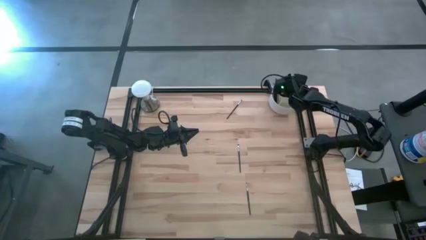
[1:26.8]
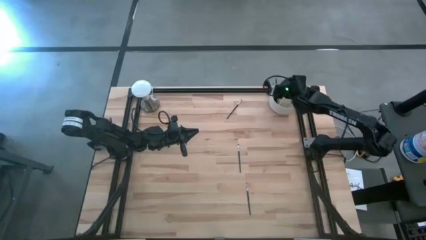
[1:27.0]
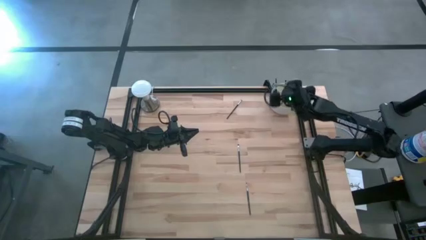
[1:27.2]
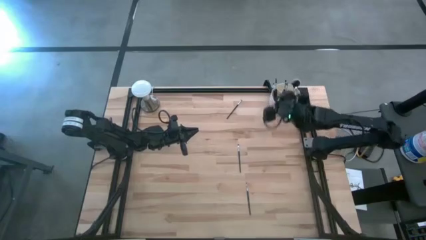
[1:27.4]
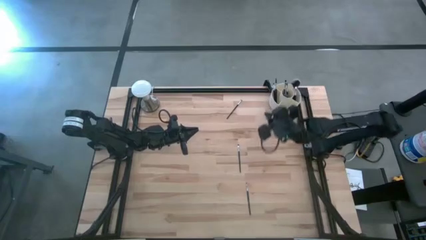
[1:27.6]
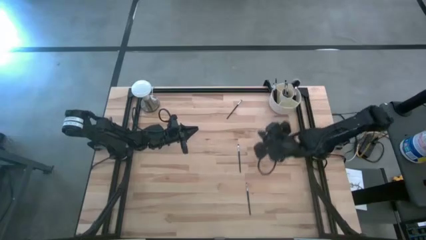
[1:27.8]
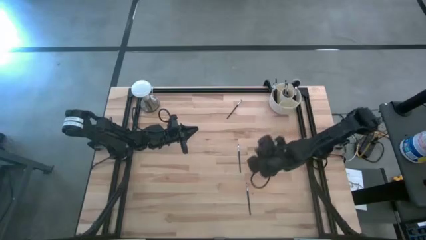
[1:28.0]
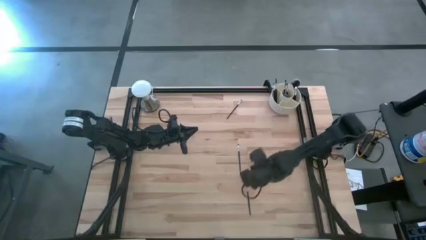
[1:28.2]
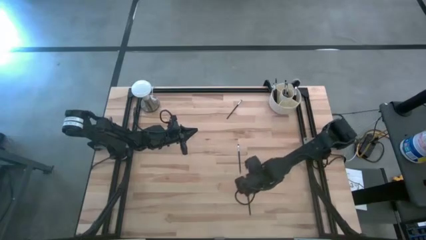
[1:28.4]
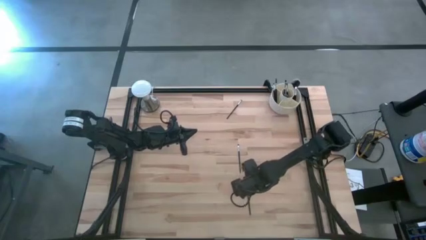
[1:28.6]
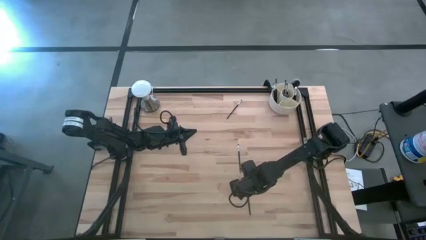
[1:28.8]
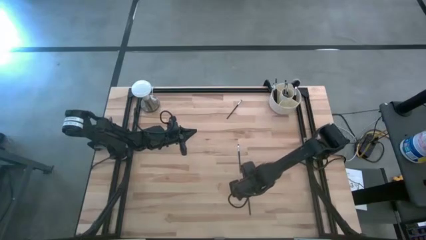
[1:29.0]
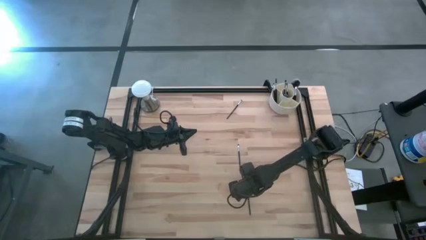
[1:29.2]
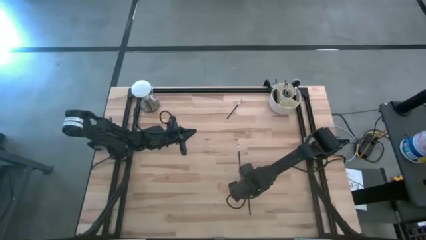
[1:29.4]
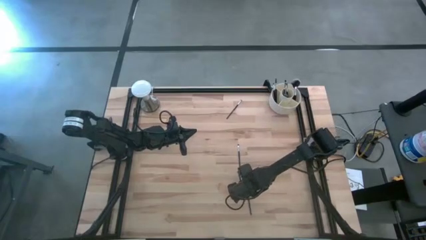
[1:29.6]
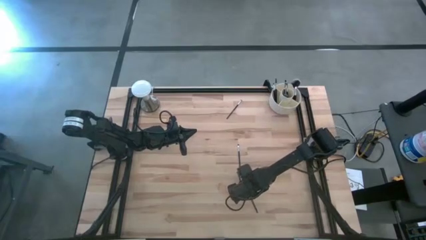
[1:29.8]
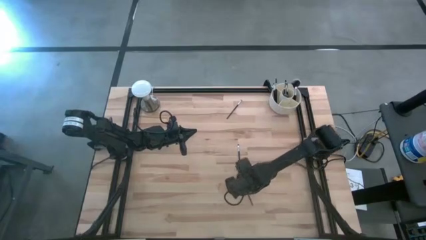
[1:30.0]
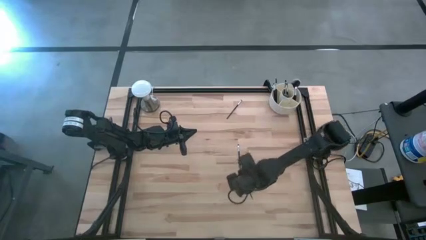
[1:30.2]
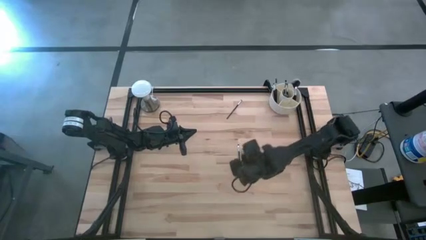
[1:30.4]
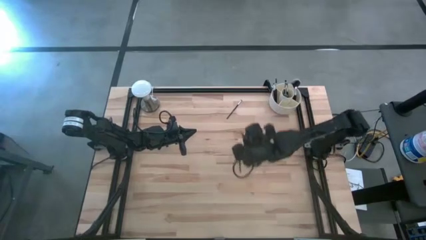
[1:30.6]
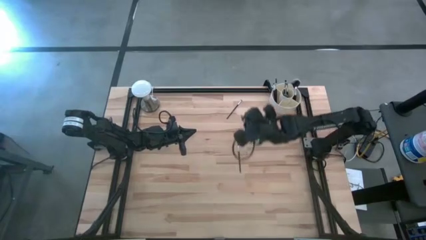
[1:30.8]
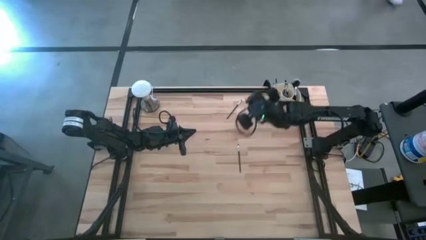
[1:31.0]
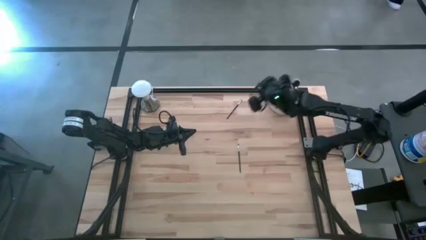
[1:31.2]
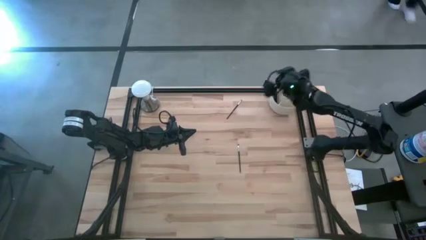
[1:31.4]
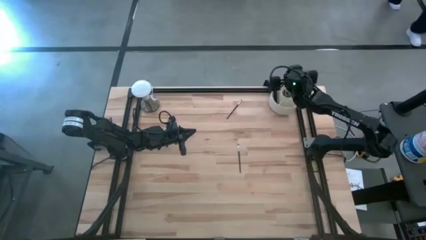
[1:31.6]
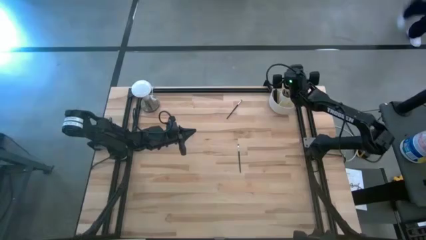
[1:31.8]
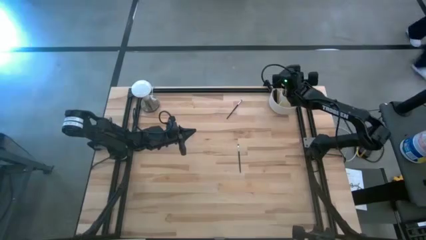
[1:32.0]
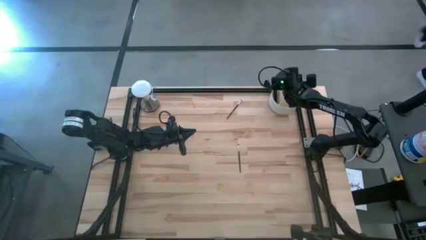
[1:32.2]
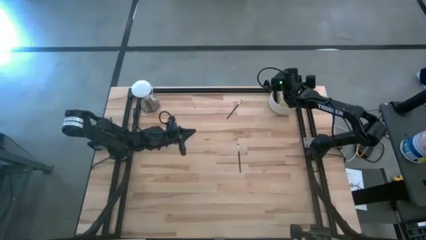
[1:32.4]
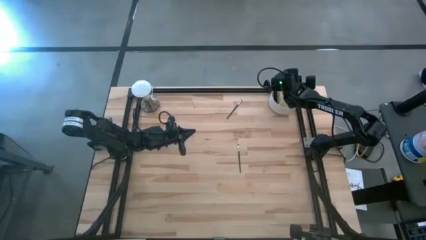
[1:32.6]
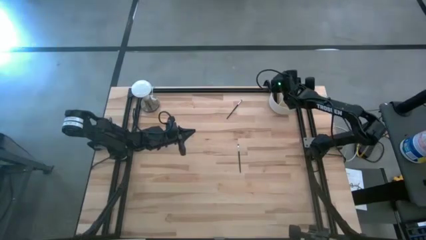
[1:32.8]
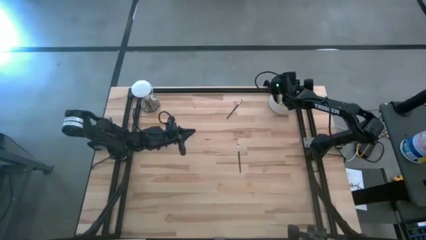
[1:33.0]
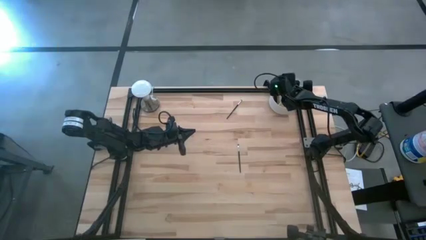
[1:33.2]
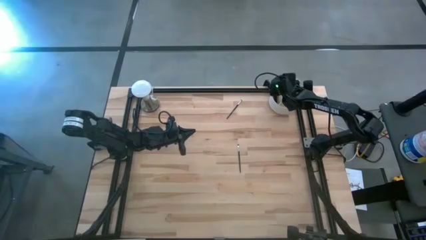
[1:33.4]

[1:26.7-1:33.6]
Task: Pick & Place Makeup Brushes
Put the black blush brush into the white makeup holder

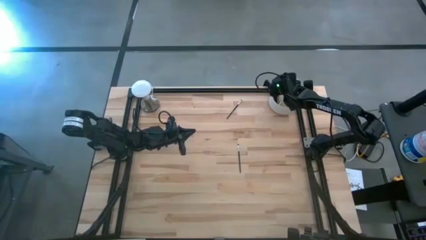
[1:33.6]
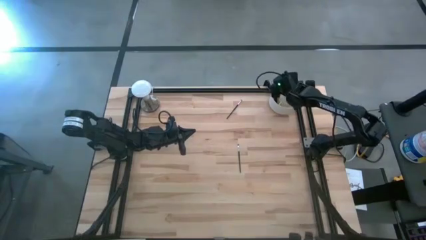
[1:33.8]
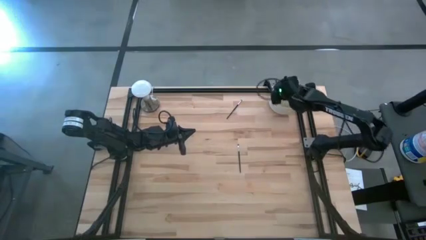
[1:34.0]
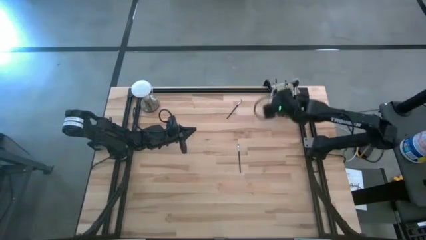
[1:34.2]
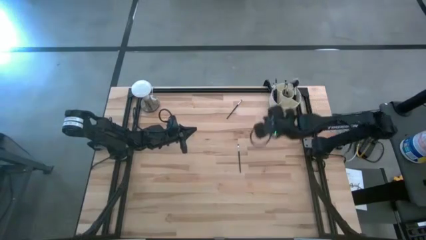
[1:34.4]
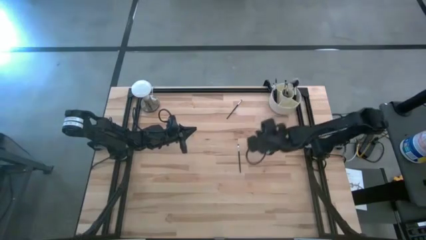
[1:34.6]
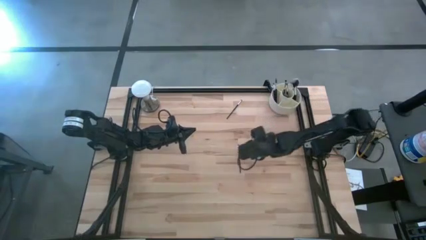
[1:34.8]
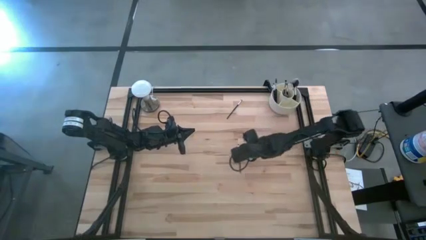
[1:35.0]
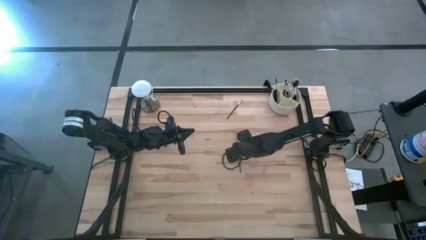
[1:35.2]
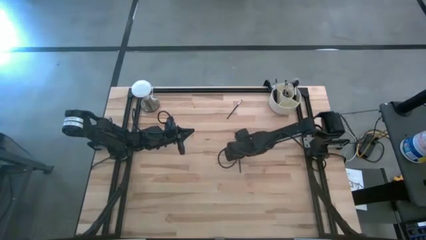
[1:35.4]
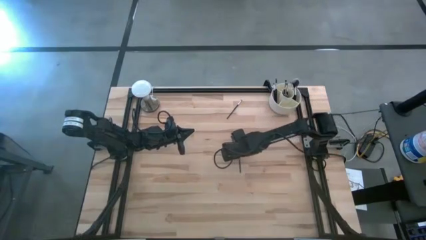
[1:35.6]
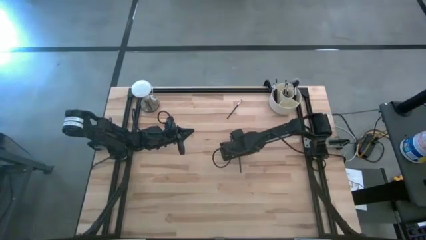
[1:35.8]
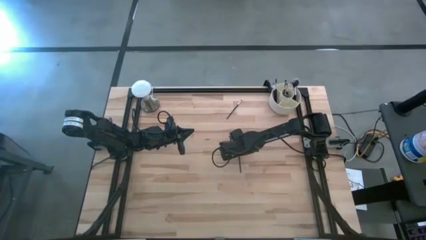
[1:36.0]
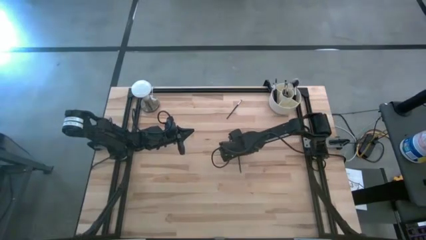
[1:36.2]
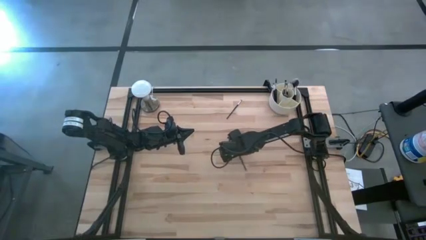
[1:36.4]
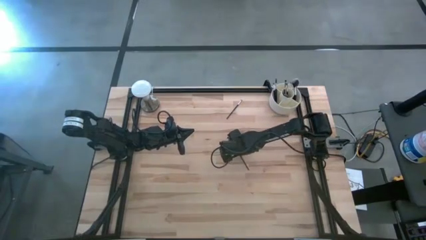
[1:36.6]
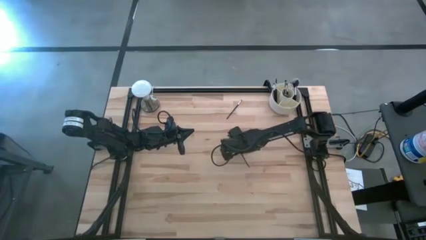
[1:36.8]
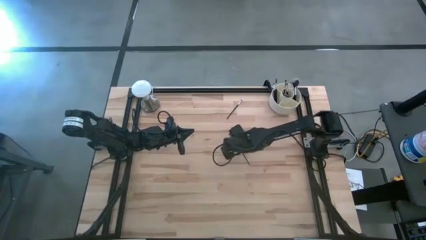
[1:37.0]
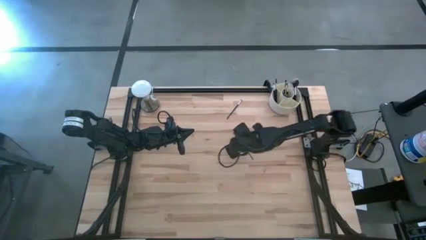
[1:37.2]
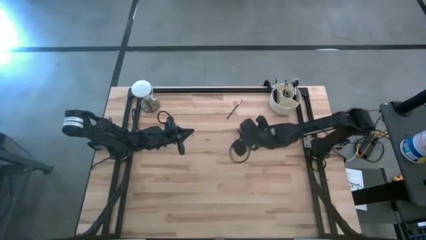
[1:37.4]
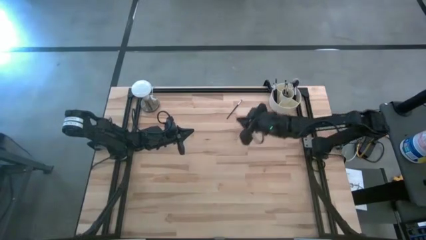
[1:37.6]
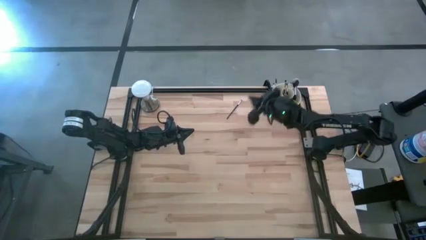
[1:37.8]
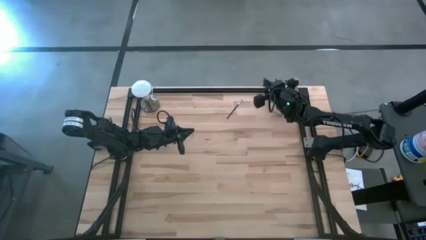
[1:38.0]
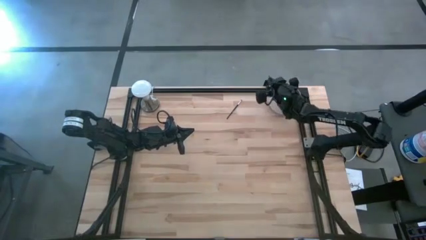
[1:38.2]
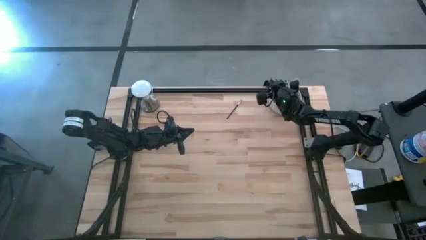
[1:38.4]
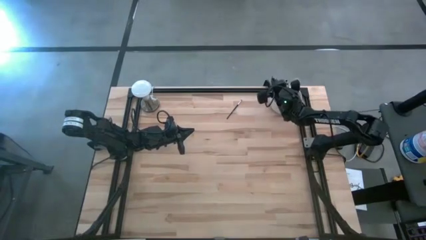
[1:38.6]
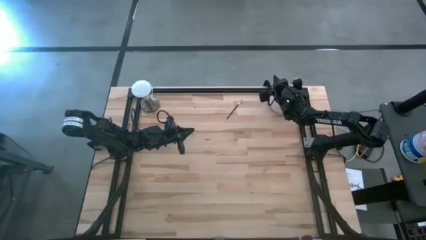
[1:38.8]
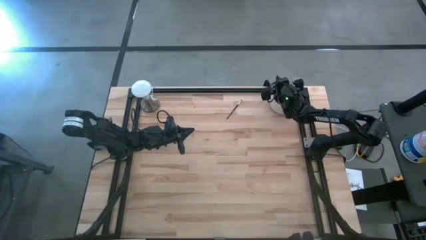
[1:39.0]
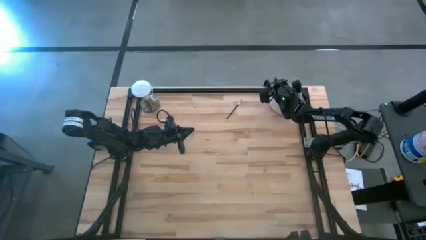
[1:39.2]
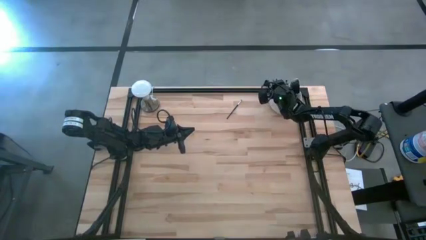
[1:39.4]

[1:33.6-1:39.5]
Put the black foundation brush into the white makeup holder
